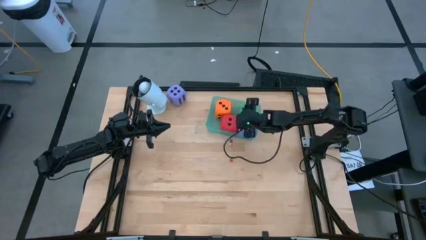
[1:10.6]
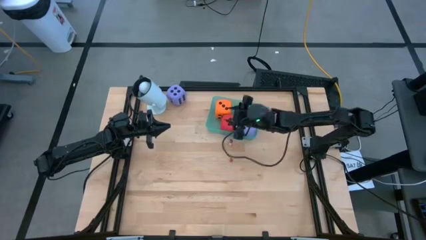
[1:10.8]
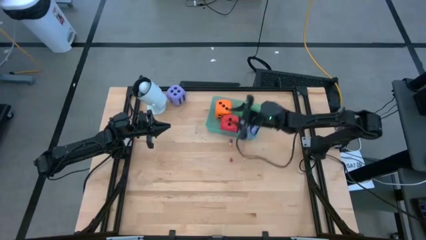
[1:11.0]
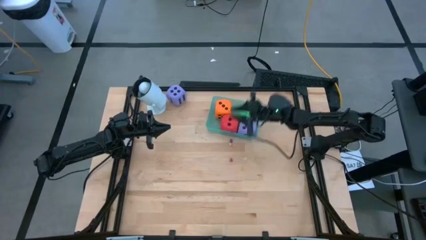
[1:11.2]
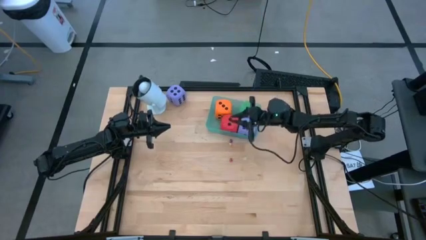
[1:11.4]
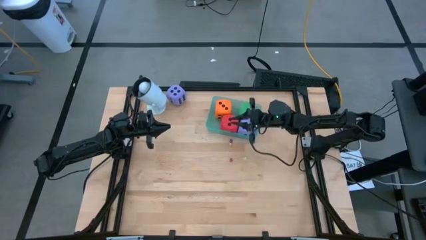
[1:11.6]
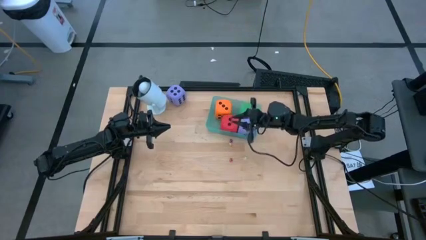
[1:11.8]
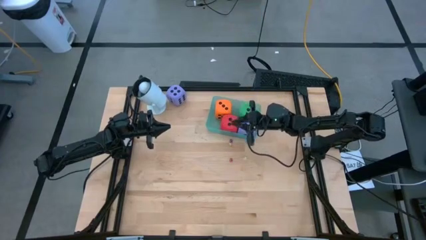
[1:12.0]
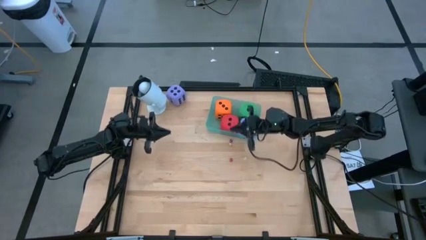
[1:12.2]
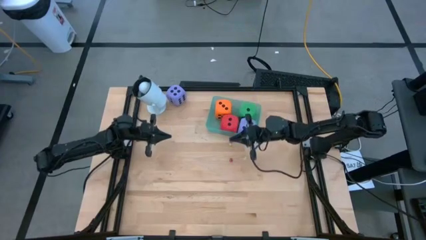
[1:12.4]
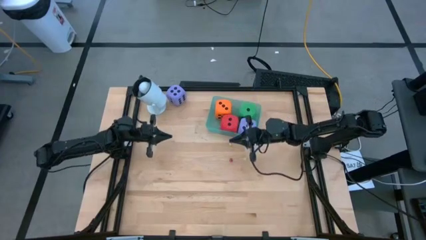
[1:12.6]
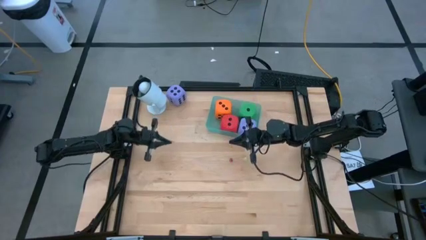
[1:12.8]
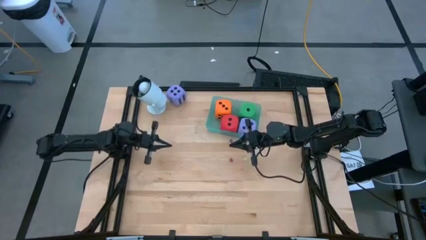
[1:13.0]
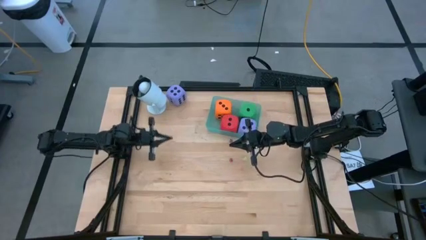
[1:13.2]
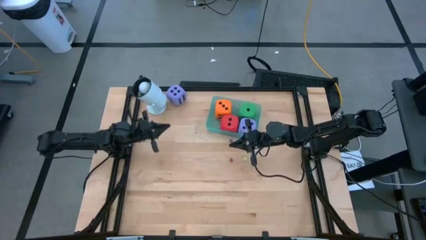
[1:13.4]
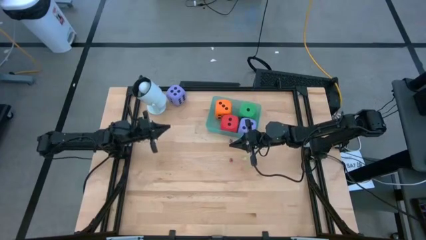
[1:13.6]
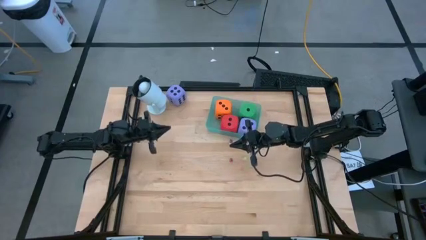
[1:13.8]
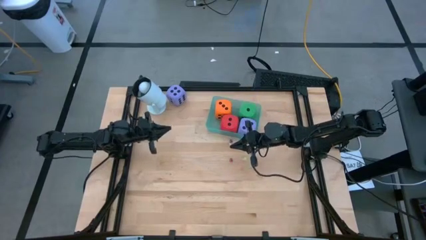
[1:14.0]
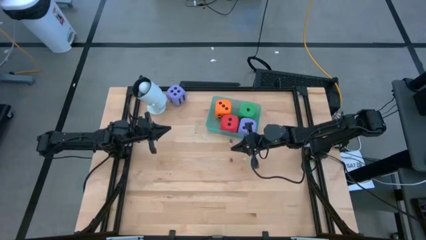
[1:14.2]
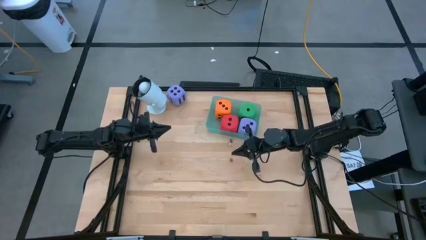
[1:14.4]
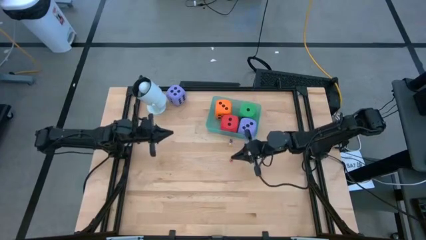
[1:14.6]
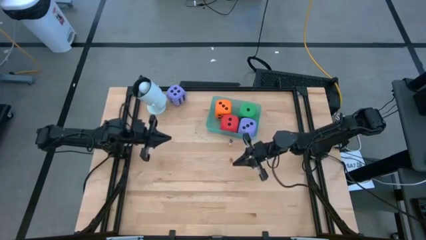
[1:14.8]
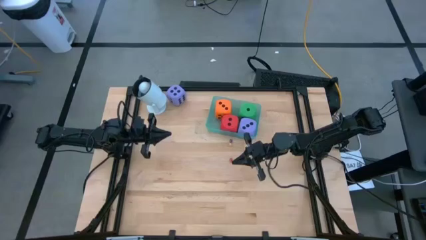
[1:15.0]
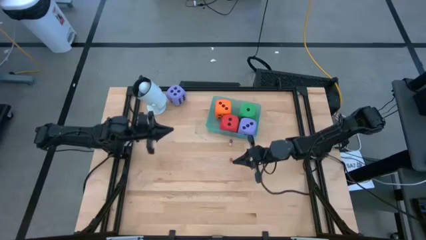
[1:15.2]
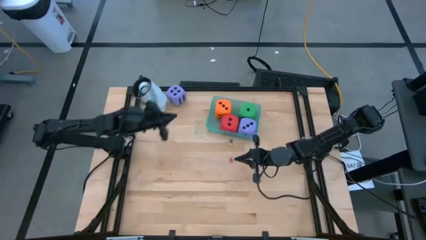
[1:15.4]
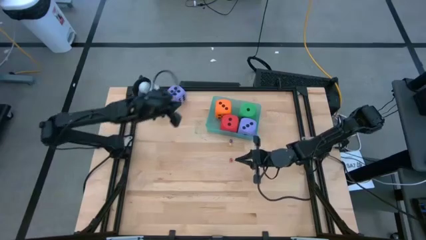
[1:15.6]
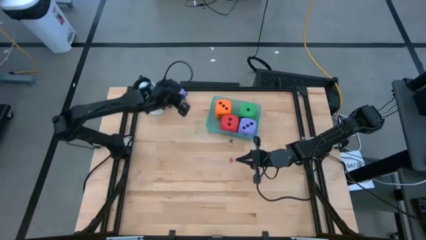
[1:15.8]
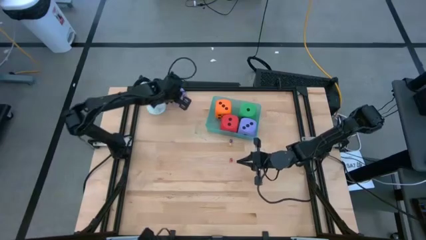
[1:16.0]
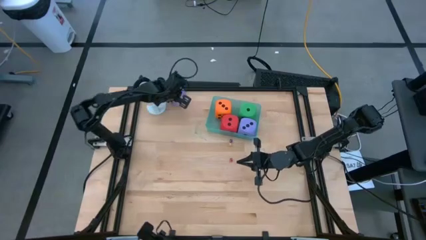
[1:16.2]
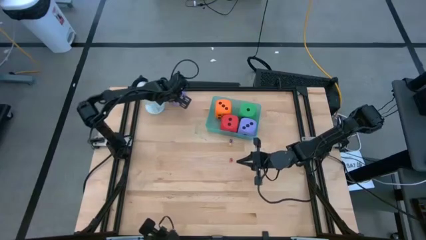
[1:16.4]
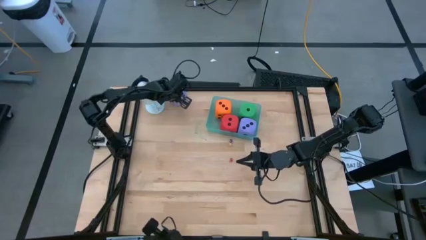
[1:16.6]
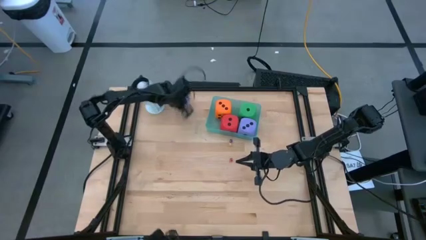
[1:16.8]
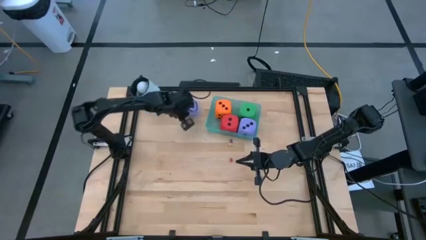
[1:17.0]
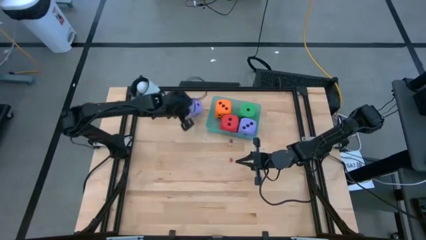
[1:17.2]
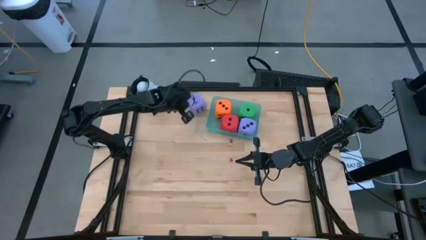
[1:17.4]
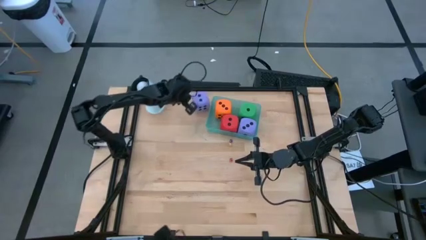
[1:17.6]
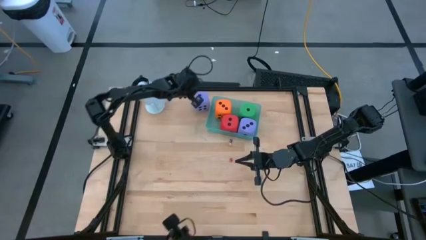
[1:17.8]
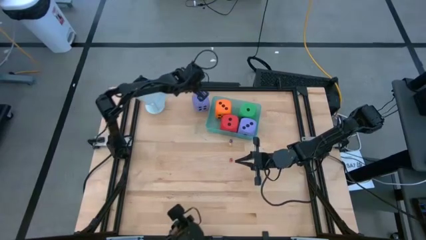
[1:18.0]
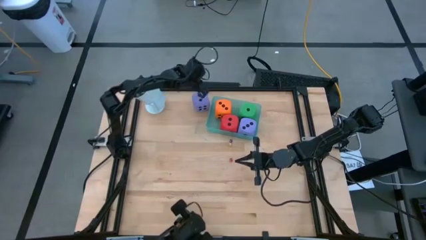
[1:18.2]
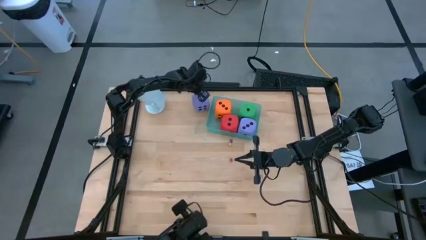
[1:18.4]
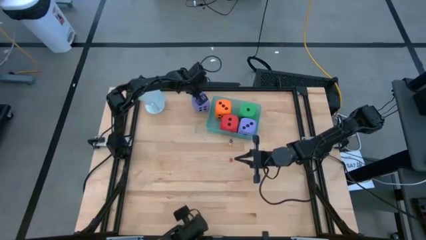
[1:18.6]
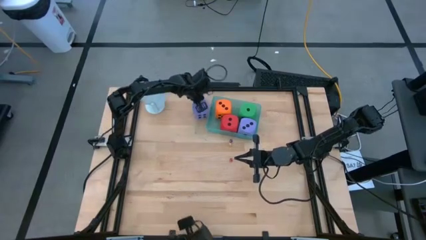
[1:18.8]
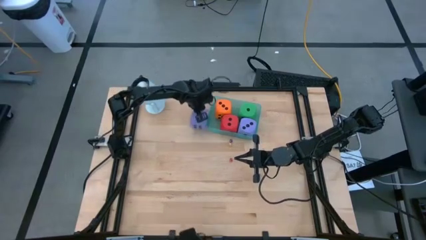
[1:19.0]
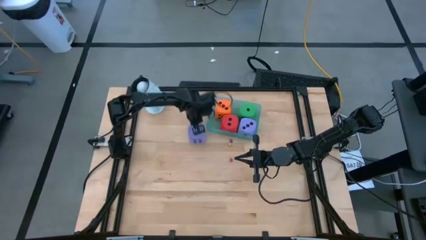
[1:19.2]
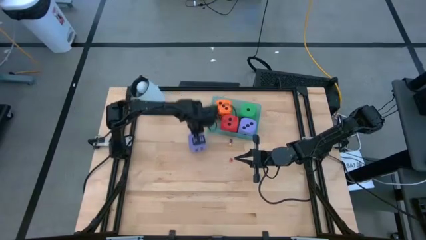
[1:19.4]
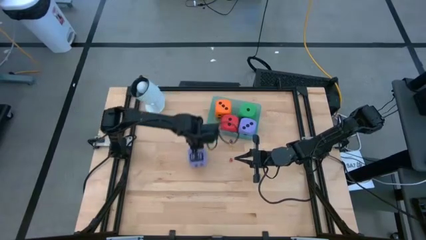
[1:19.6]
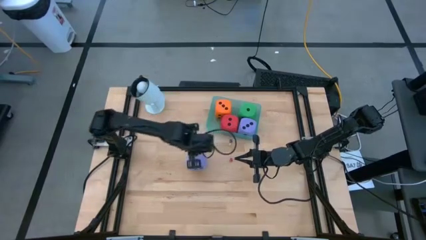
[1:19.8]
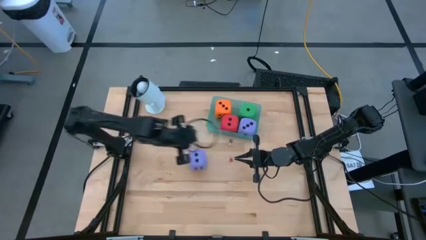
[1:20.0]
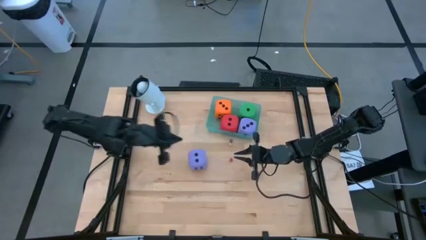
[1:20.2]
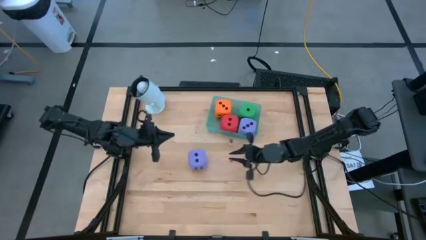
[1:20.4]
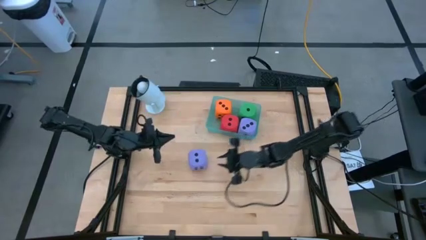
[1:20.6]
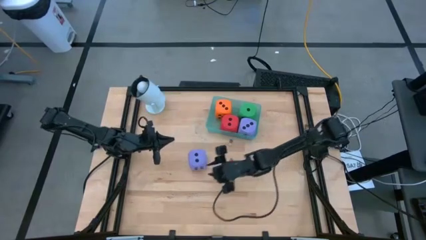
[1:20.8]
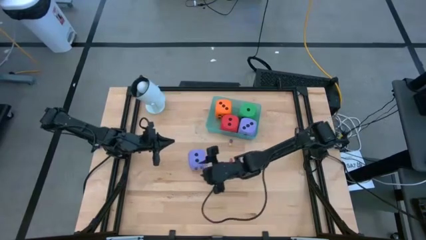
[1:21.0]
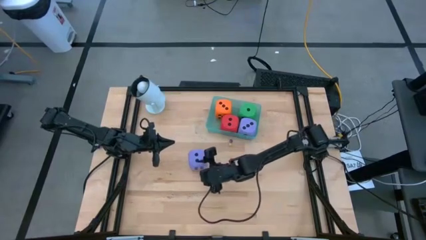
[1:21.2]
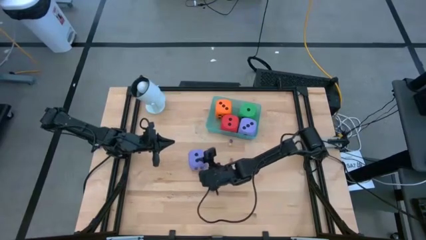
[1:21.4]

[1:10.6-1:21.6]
Task: Pick & Place Dice
Put the large purple die into the blue bin

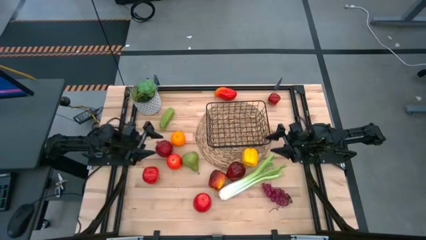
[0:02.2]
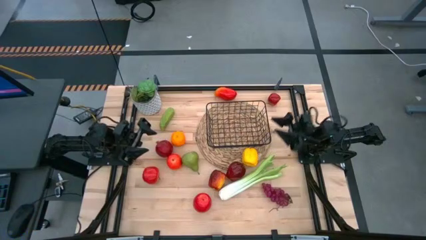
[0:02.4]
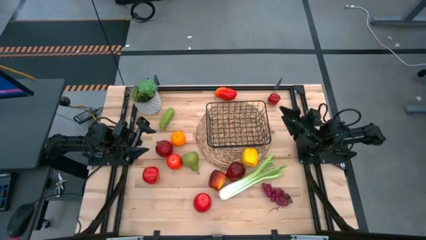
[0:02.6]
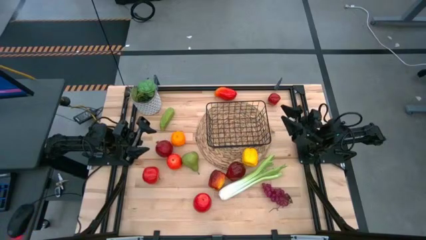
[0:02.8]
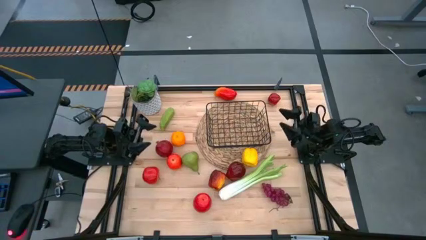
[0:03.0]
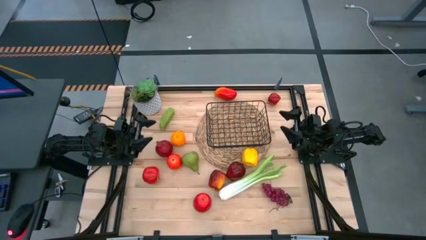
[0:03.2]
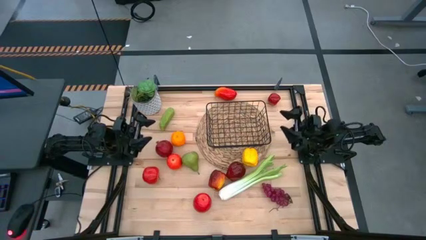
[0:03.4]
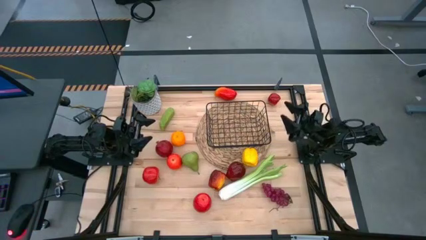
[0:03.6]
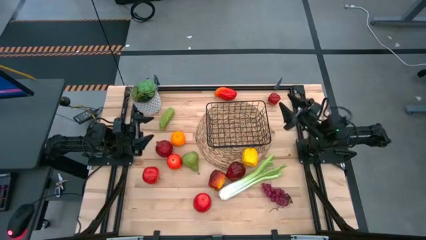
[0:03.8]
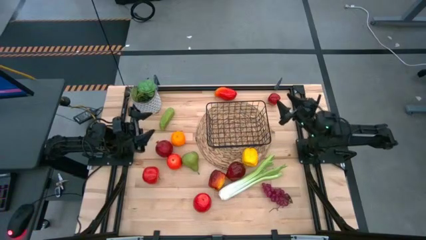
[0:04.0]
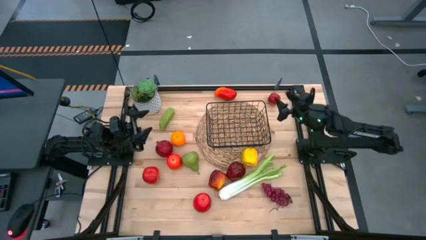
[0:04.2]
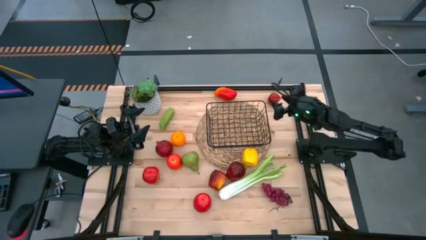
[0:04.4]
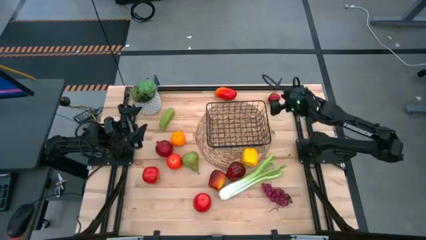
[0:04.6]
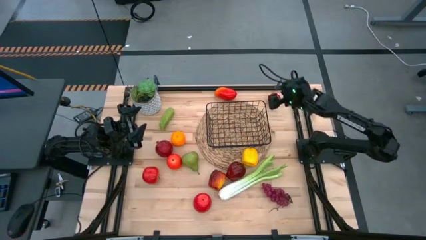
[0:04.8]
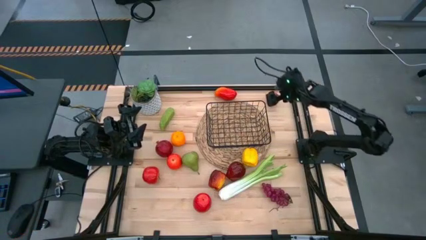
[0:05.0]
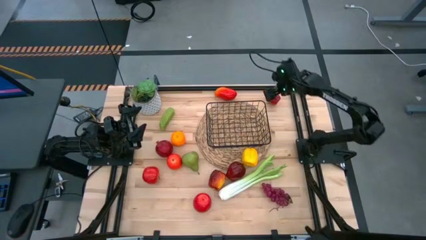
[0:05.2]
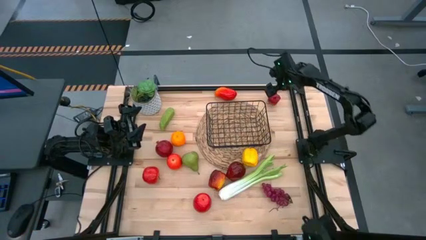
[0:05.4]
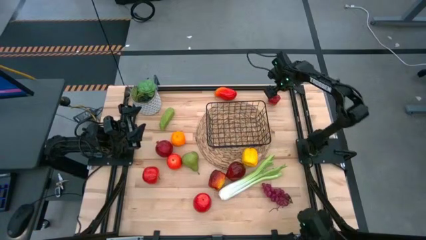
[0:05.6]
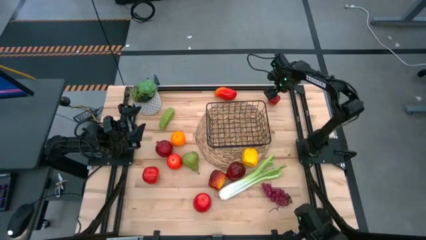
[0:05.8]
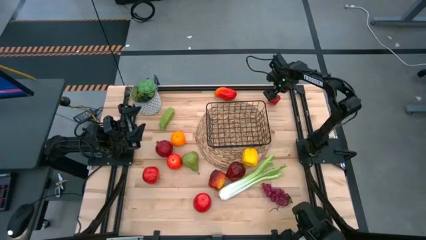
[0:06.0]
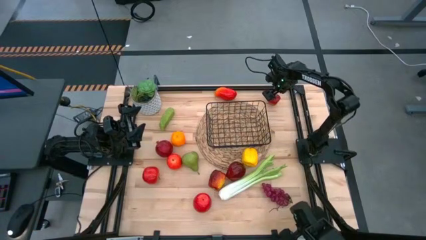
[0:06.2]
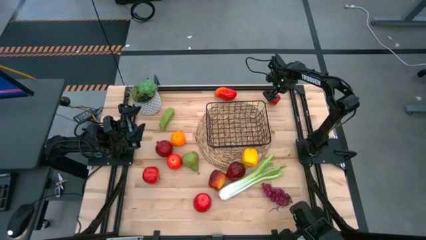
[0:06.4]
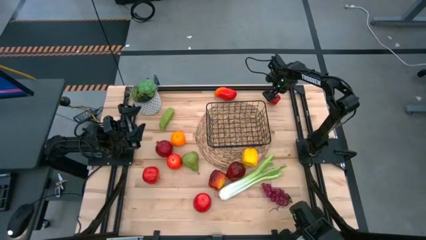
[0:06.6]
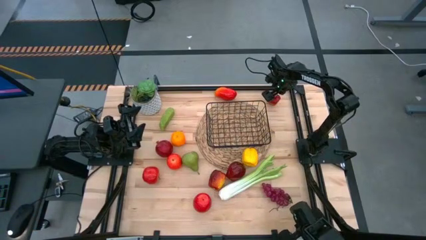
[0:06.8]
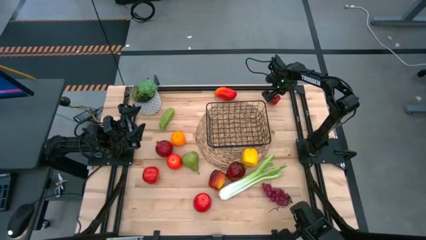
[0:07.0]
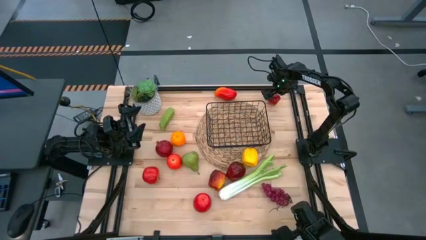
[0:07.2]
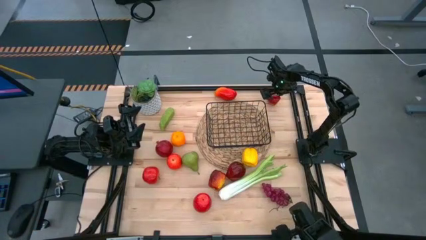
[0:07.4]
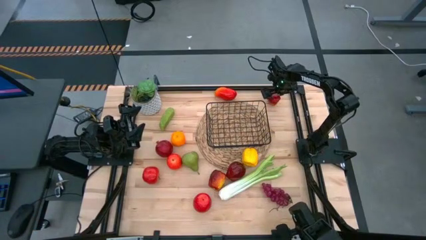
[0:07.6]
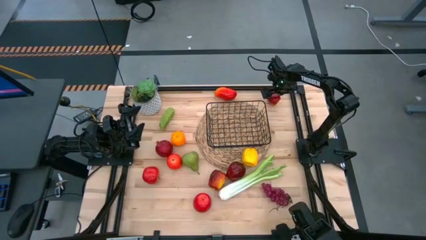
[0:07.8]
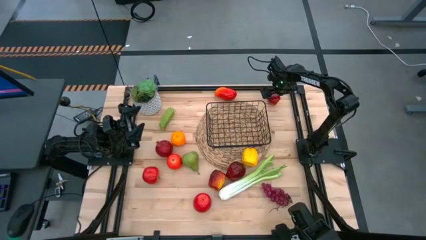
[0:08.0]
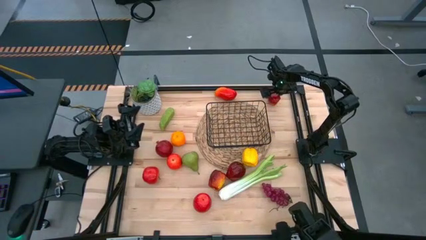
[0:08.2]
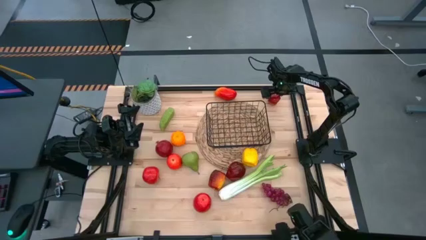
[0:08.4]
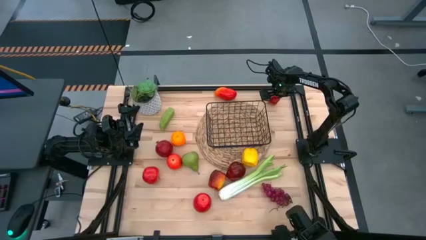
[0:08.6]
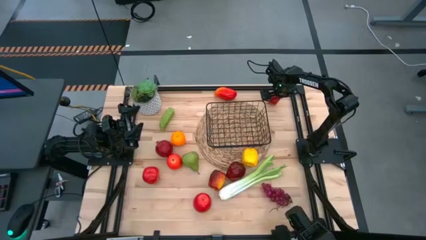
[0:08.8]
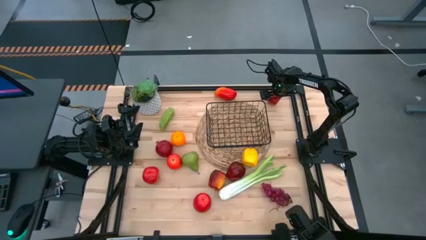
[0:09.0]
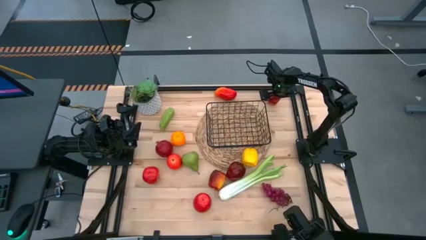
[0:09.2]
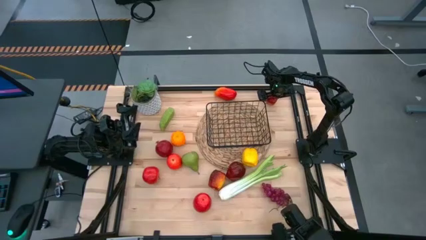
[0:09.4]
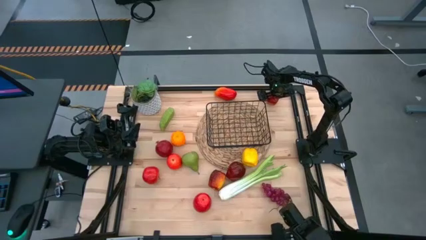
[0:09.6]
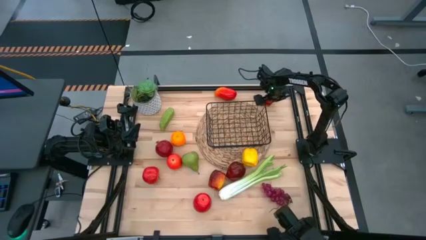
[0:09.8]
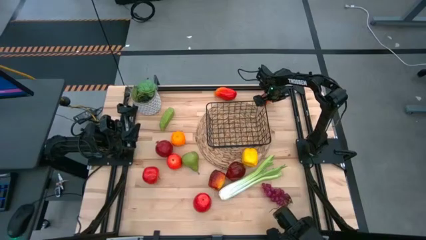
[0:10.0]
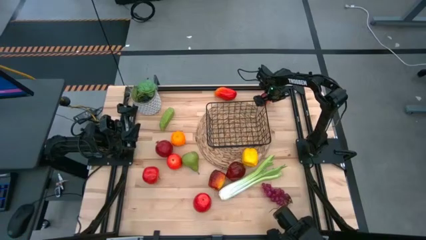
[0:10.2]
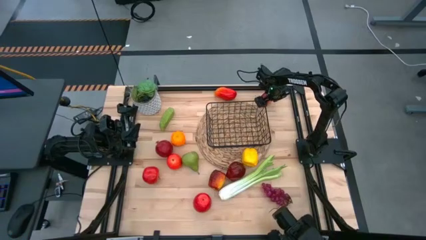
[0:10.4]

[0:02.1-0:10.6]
Task: Build produce basket
Put the red apple into the black wire basket
